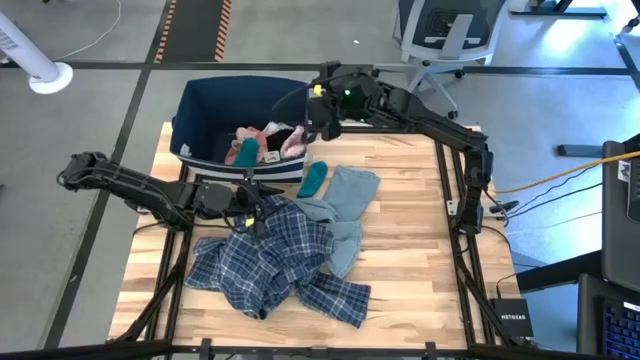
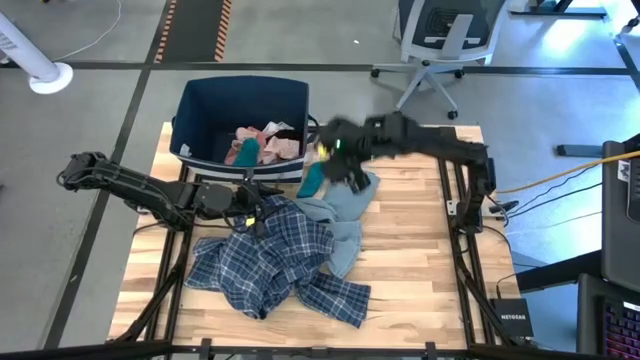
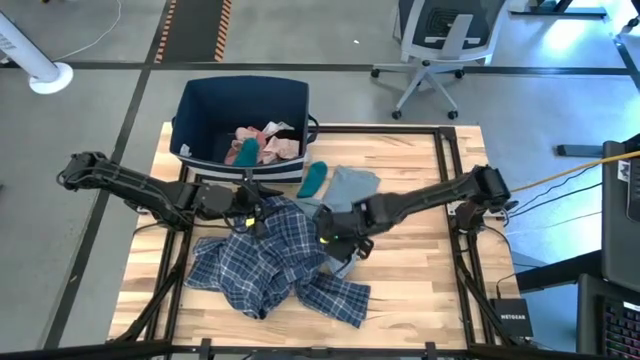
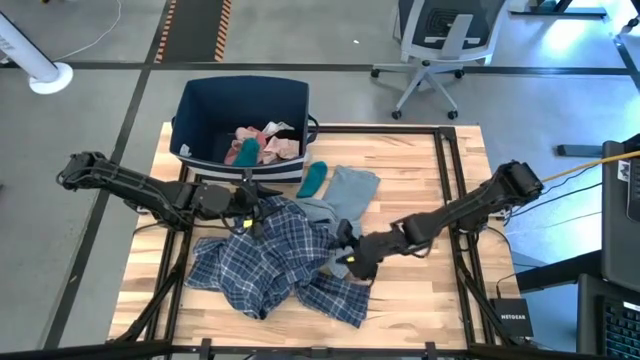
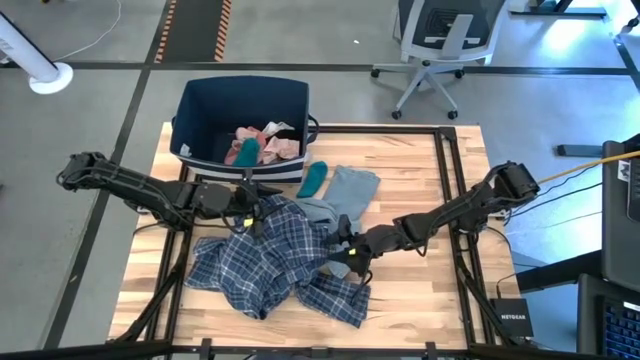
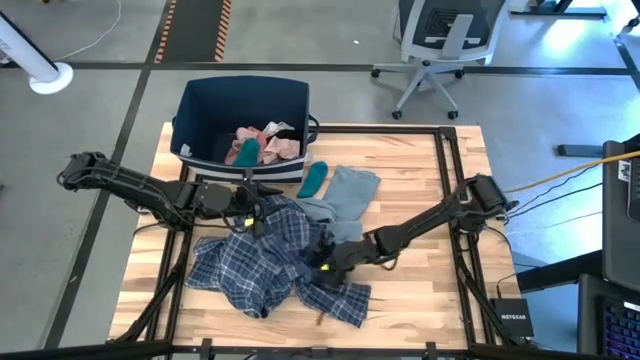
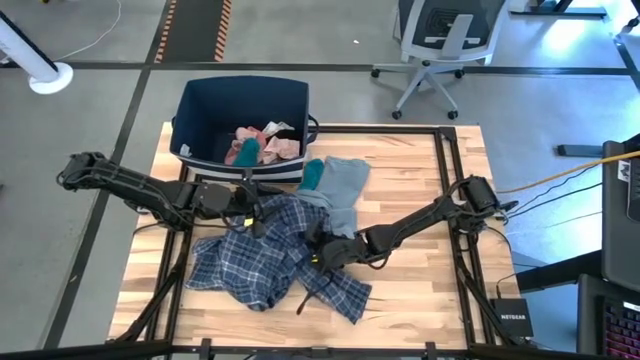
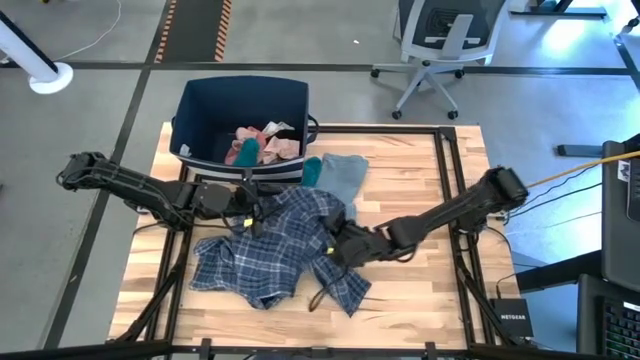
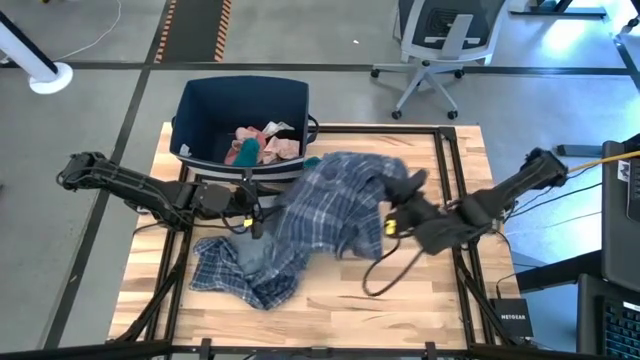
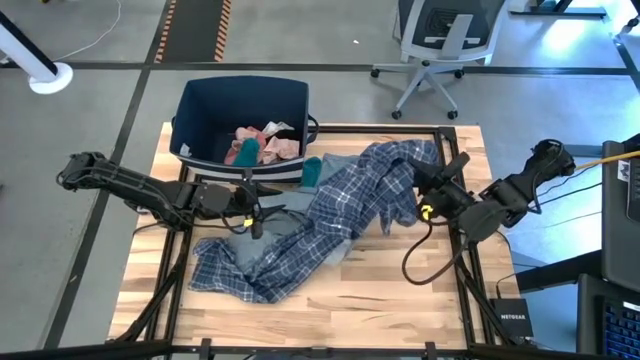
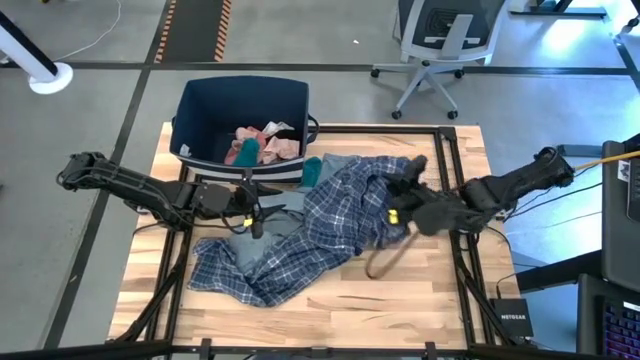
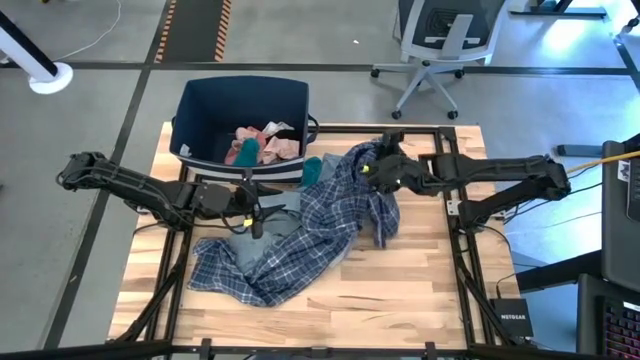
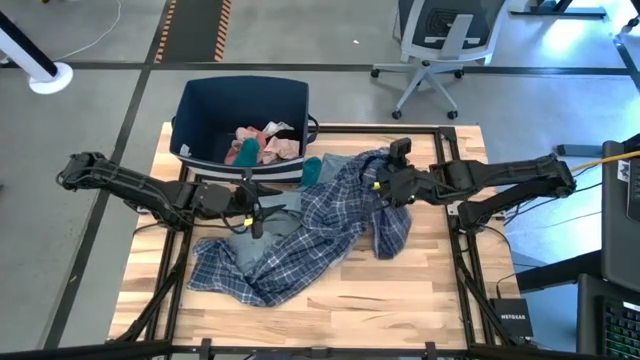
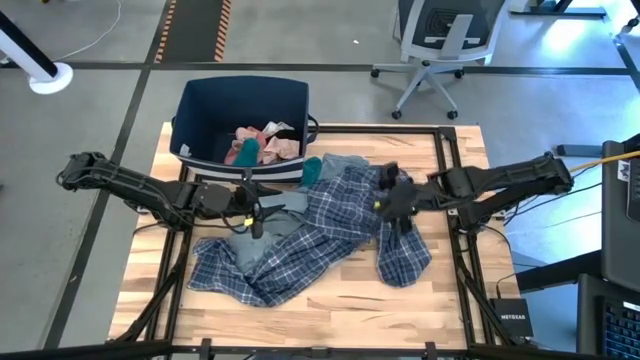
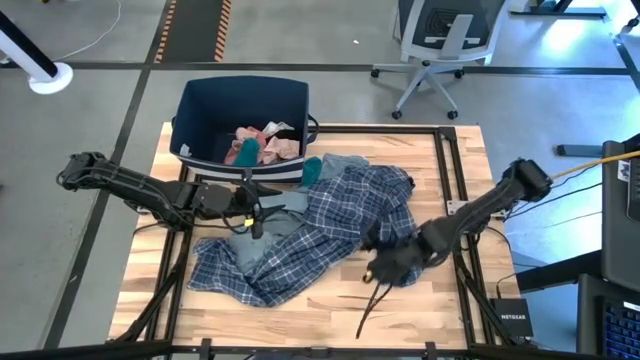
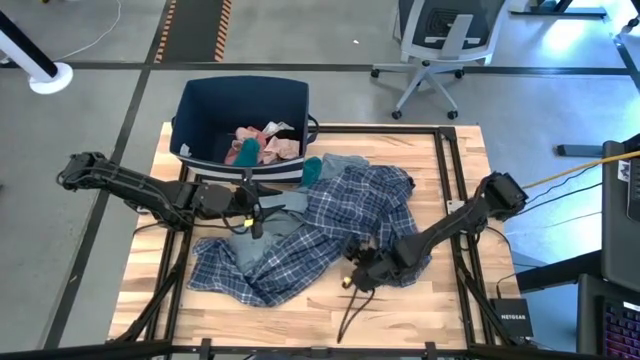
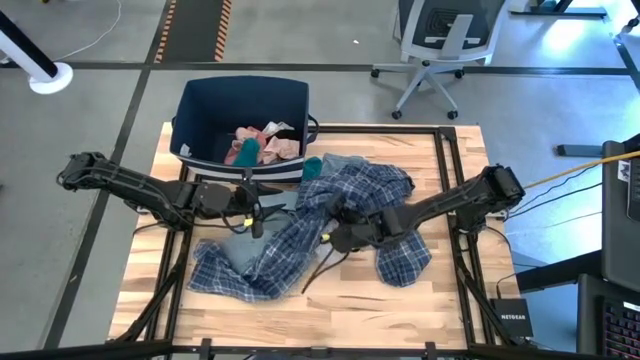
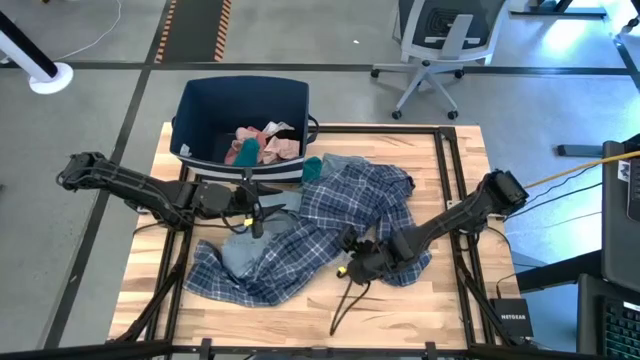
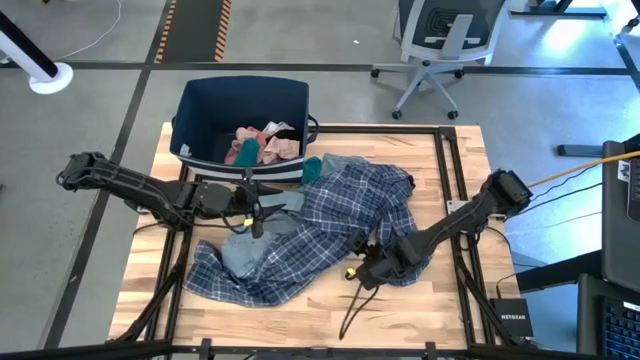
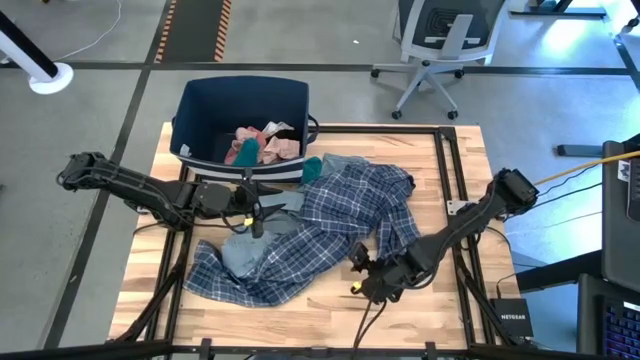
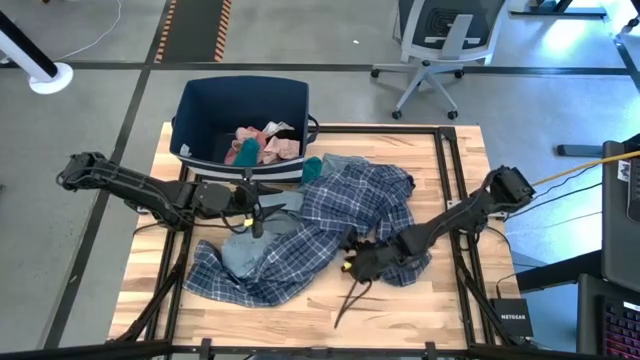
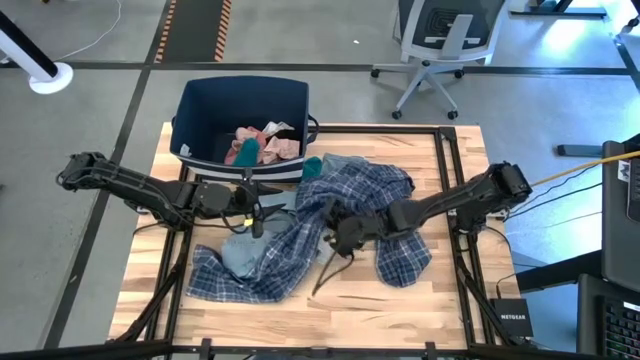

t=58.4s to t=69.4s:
Task: Sort clothes
Move the blue patterned pajama to the middle right

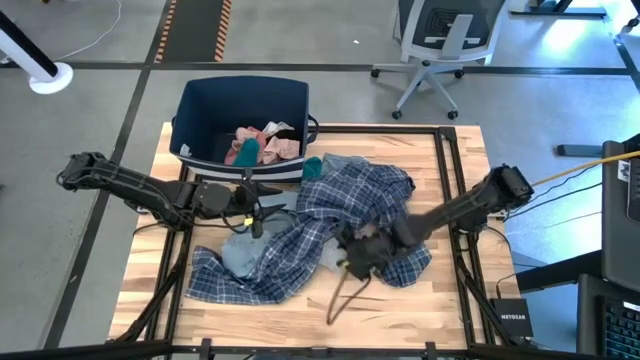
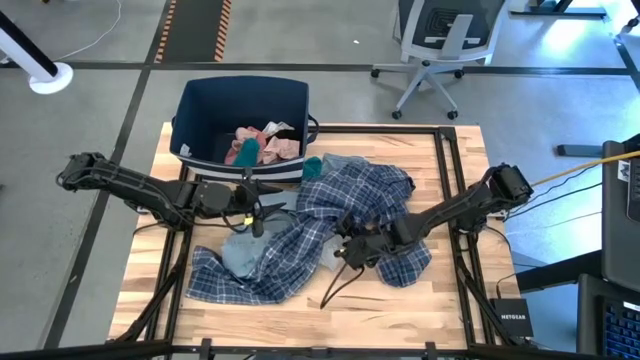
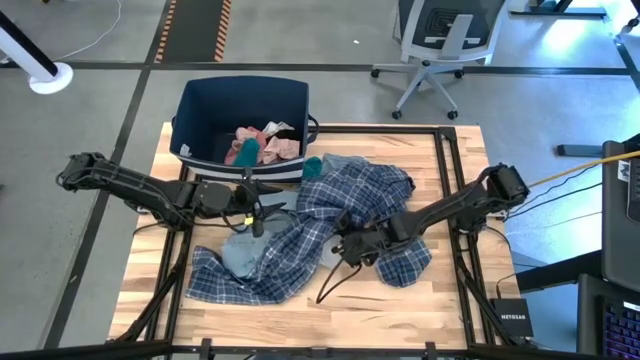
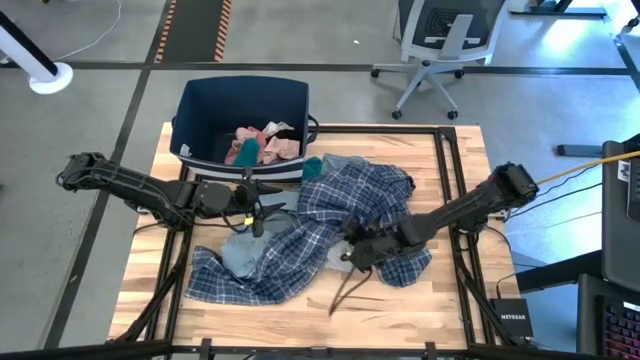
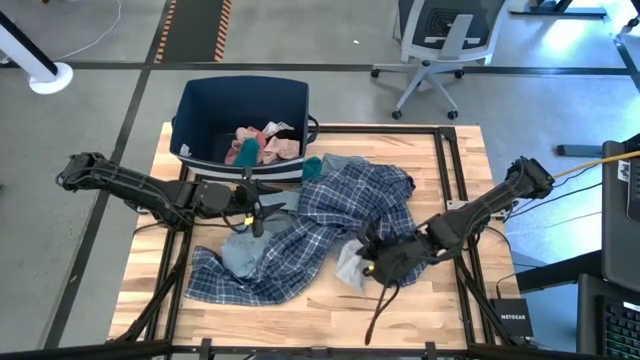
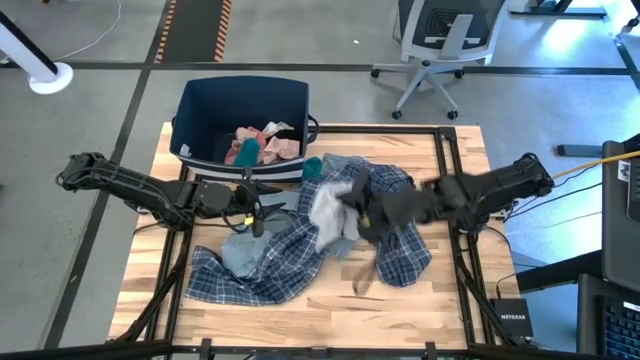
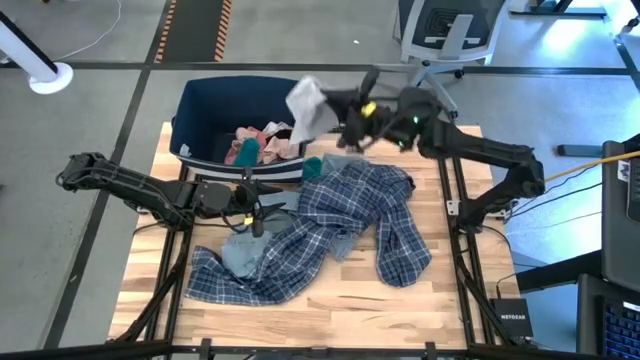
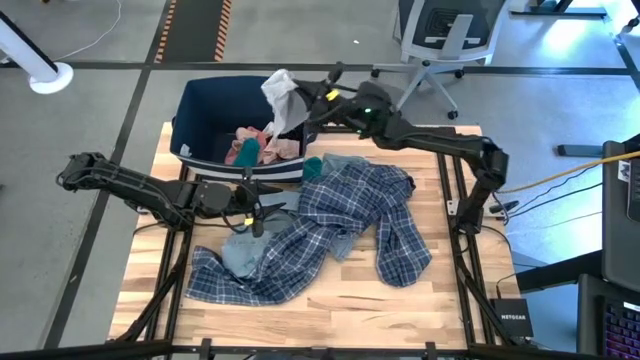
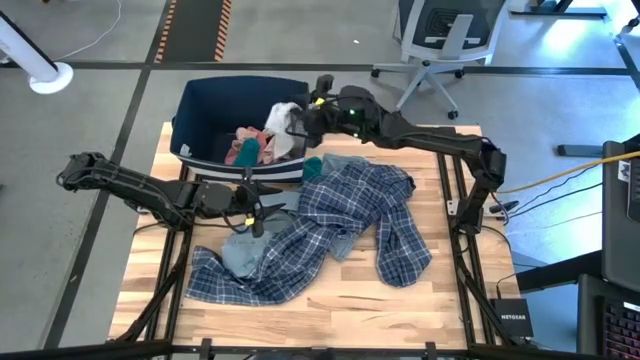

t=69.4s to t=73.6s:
Put the gray short pants into the blue laundry bin

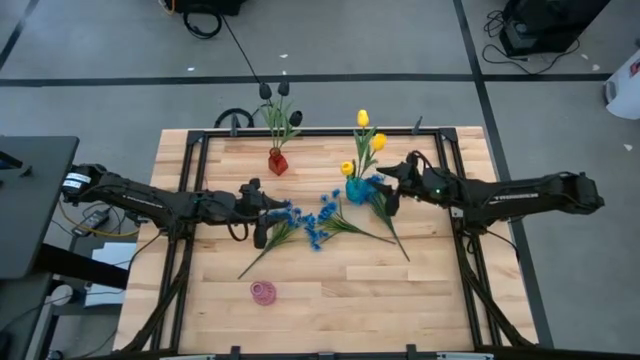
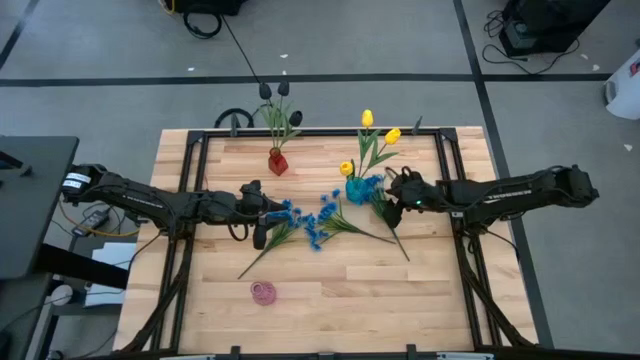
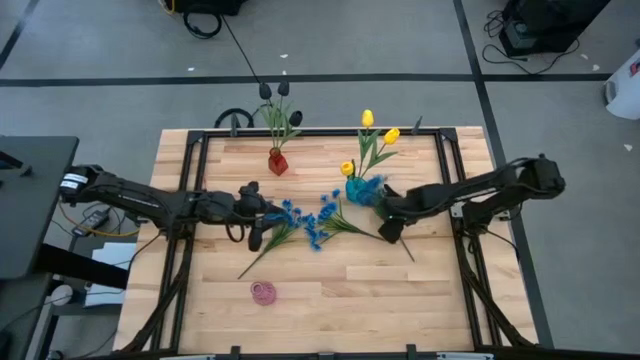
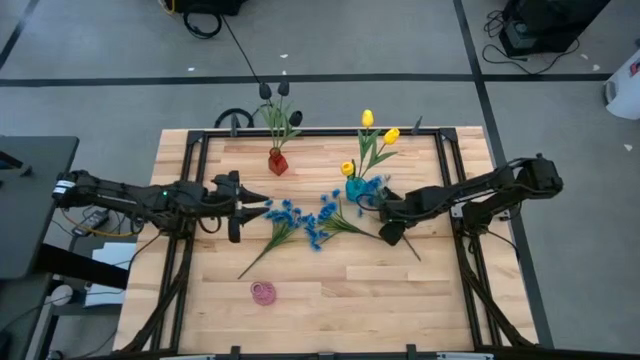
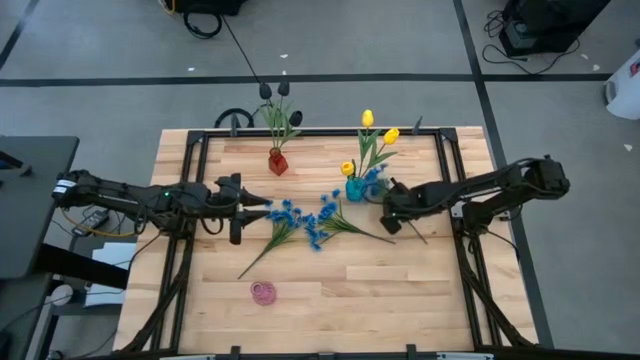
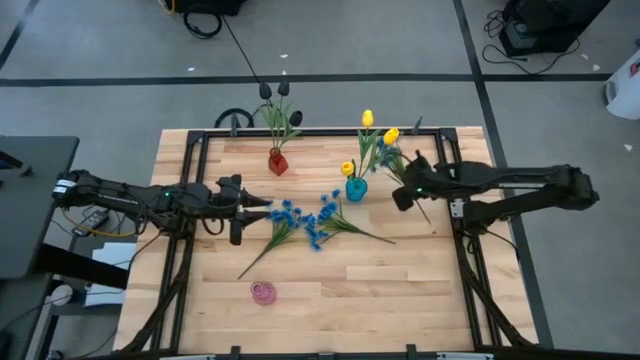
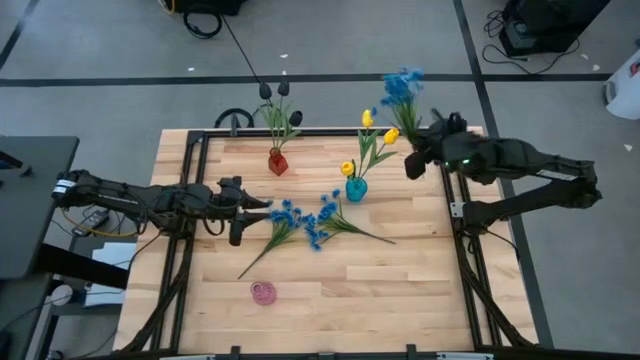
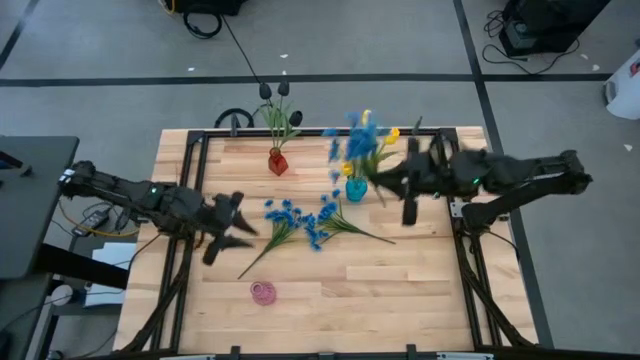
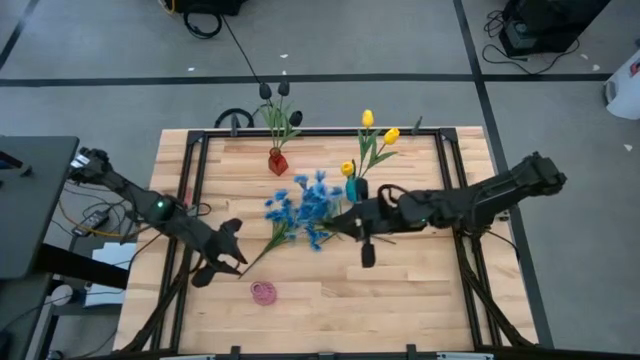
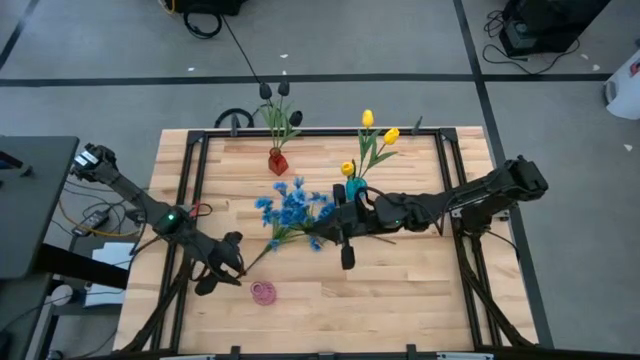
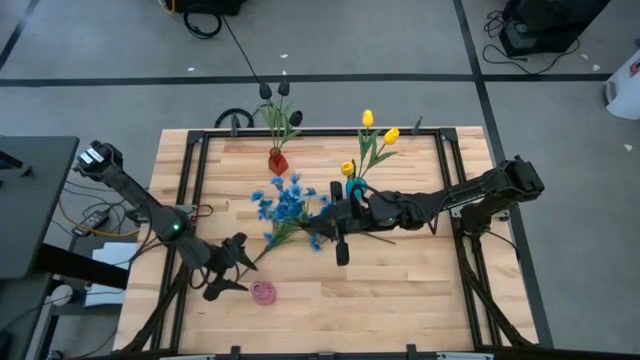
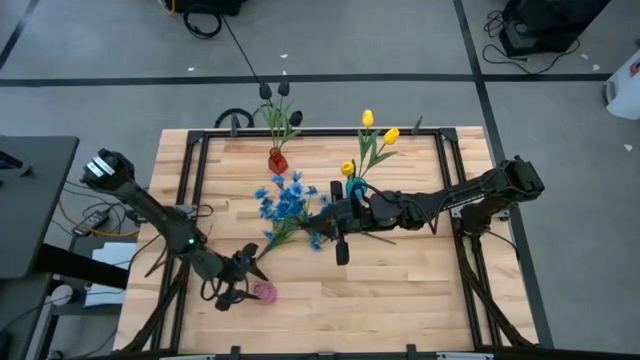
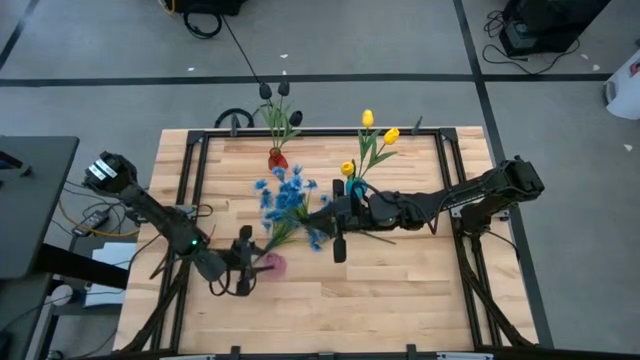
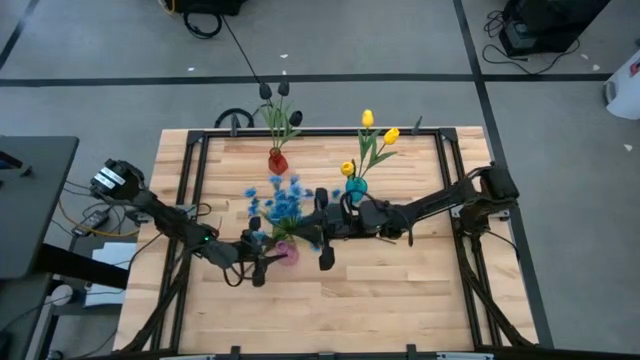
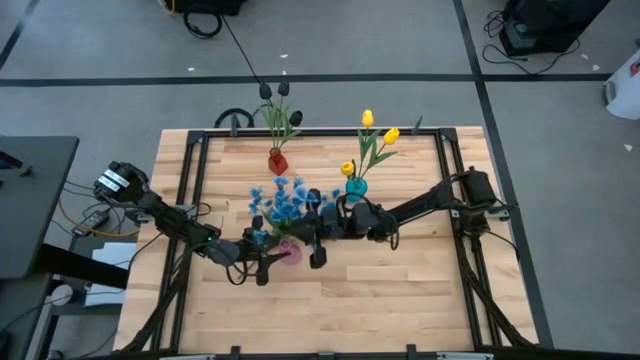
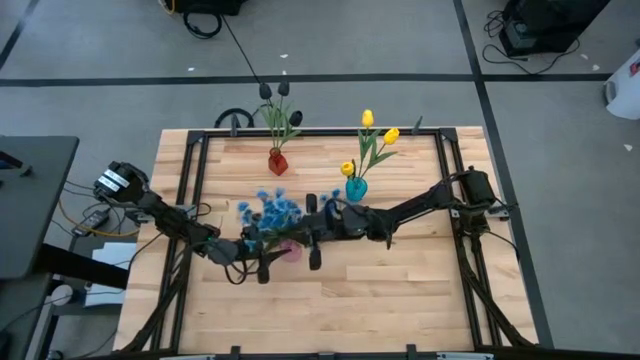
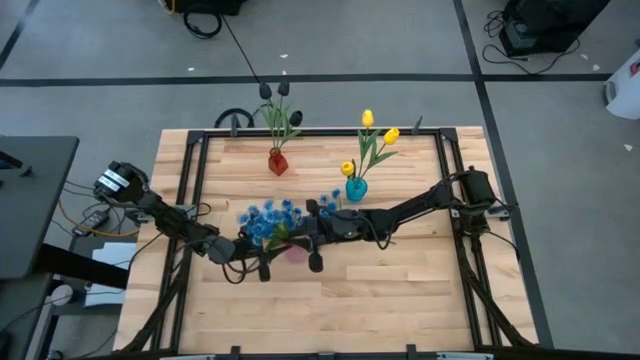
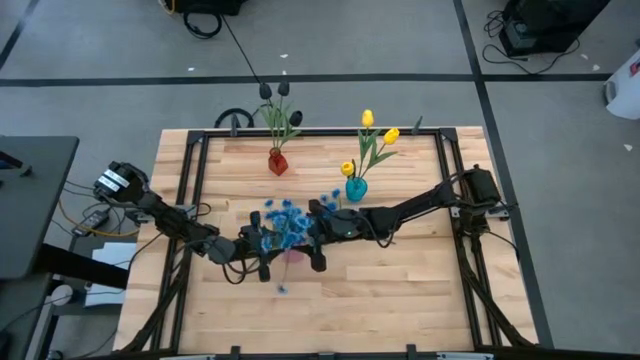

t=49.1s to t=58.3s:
Task: Sort flowers into vase by color
Put the right blue flowers into the violet vase
